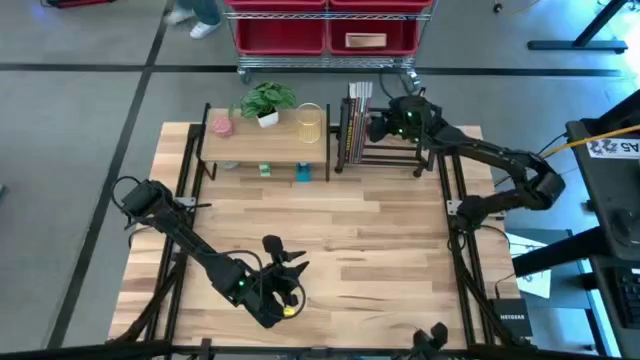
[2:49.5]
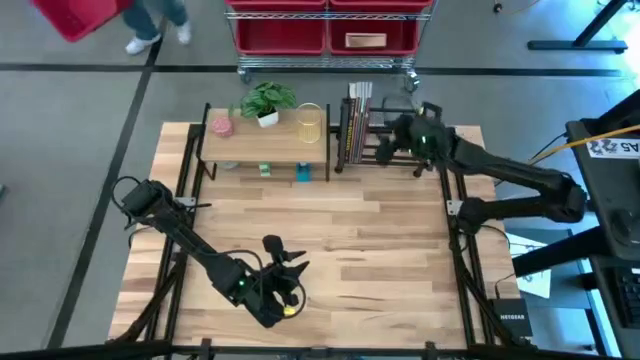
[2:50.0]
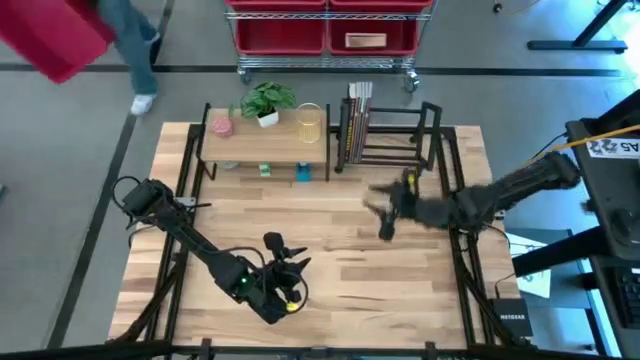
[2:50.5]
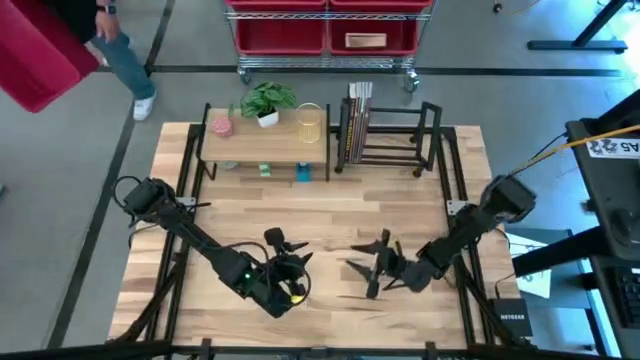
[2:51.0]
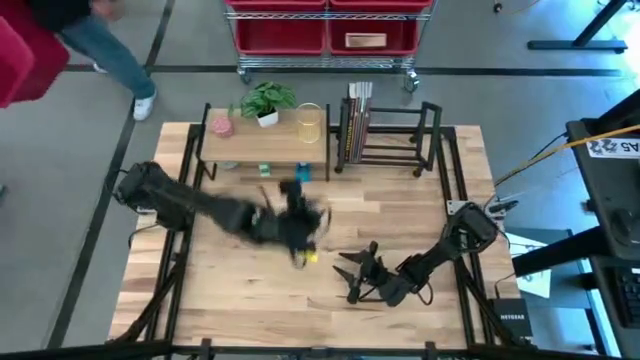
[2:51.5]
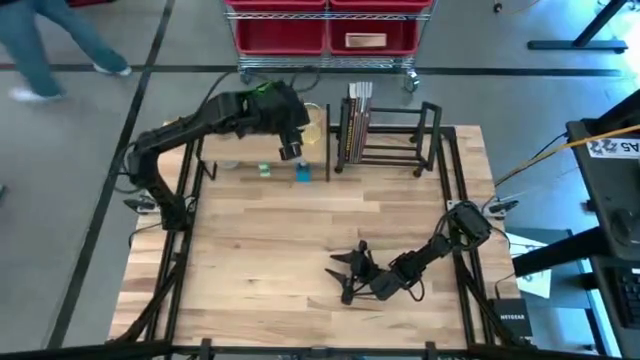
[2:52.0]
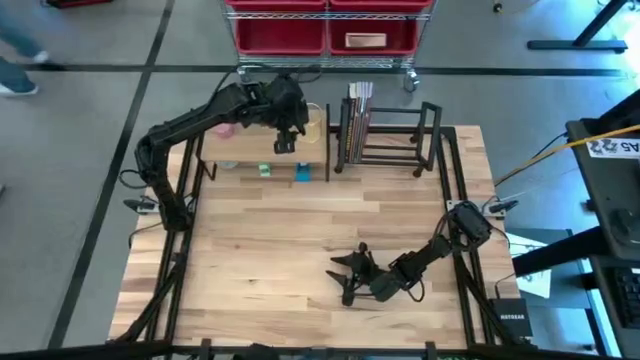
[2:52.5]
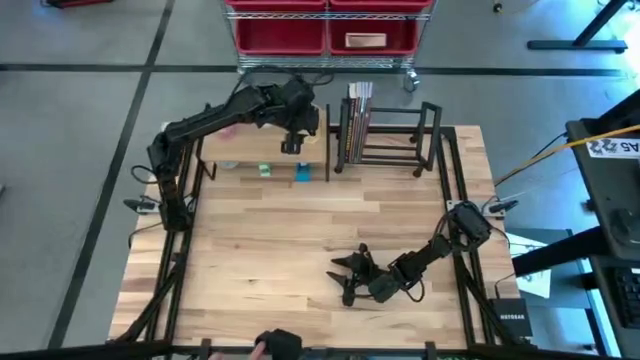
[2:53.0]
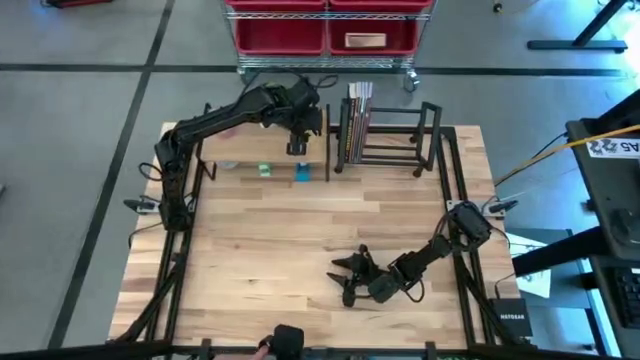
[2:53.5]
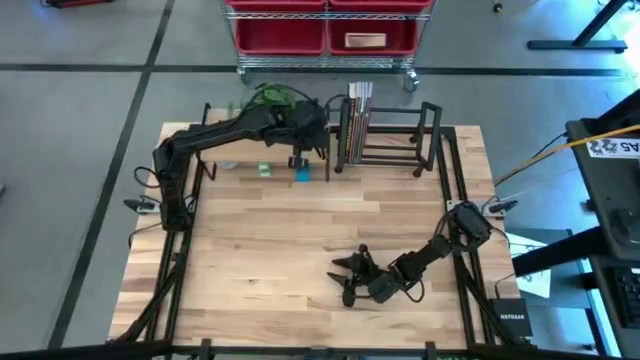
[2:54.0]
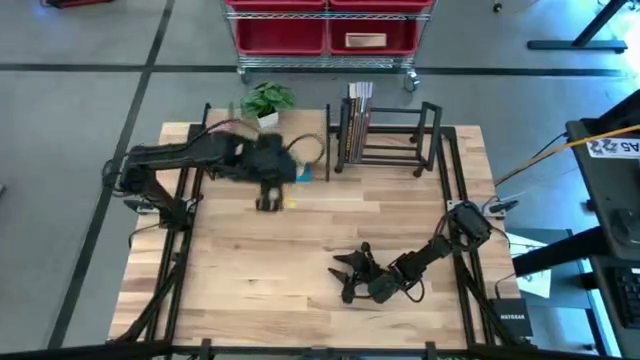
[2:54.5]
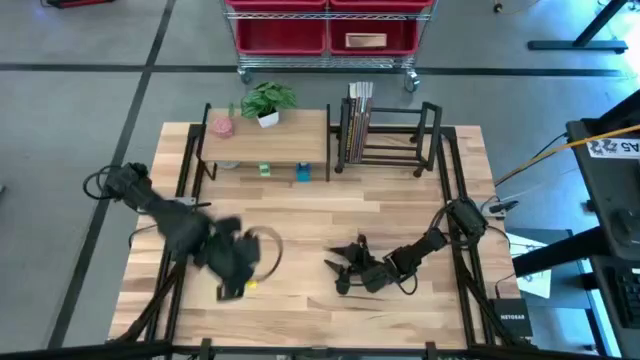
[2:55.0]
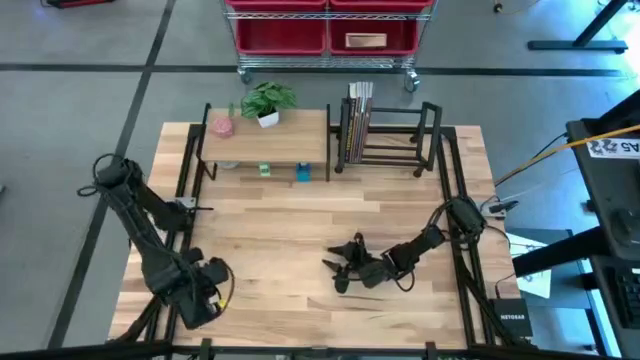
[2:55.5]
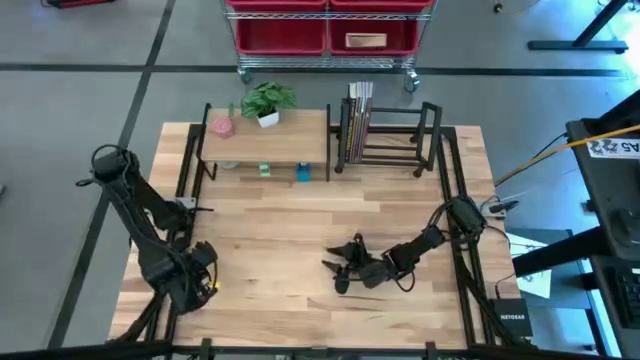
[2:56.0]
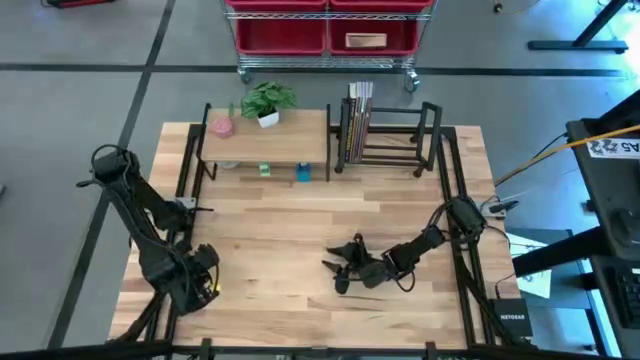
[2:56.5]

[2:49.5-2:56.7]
Task: Stock shelves
Remove the gold pen holder from the shelf

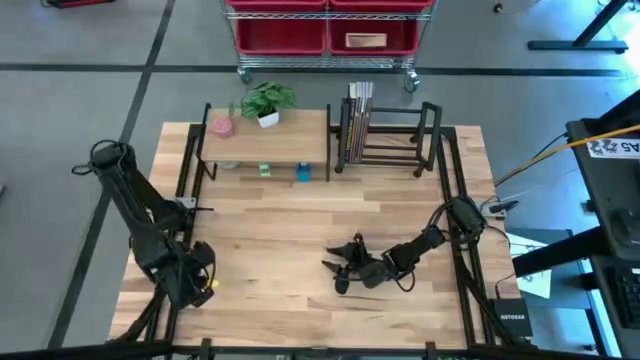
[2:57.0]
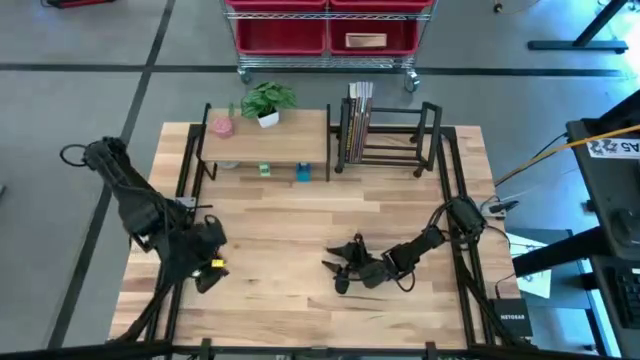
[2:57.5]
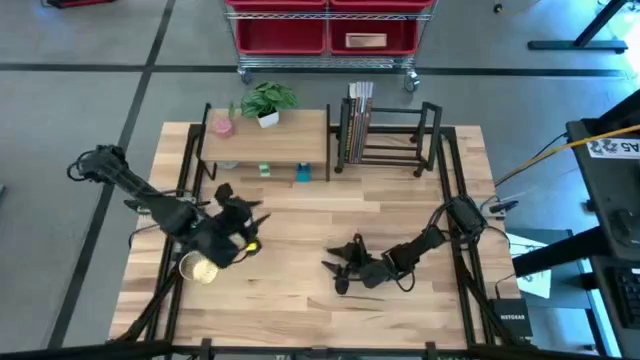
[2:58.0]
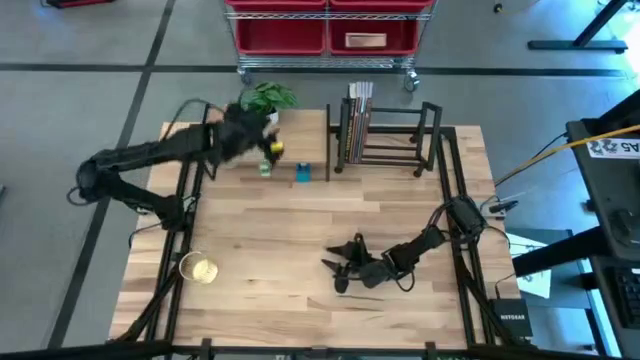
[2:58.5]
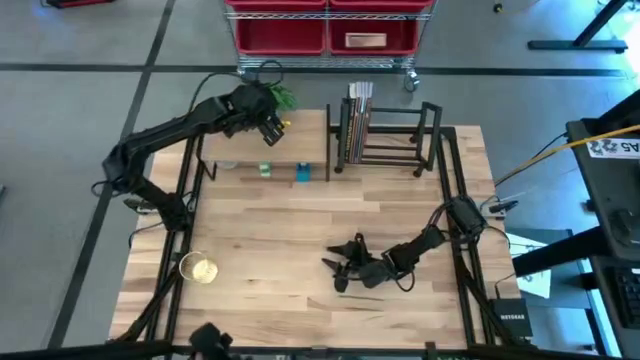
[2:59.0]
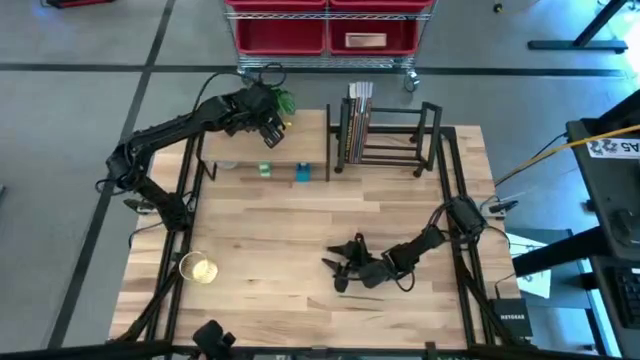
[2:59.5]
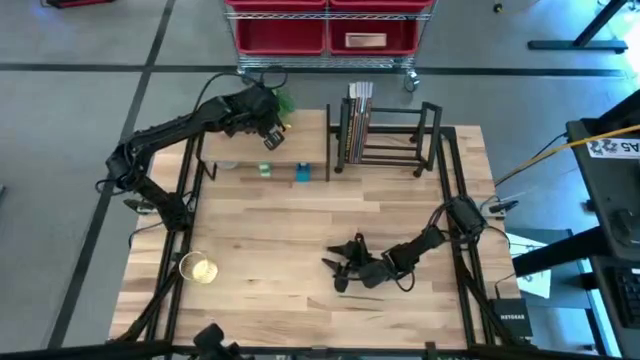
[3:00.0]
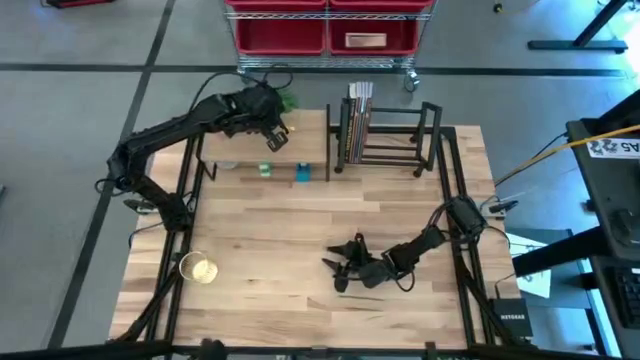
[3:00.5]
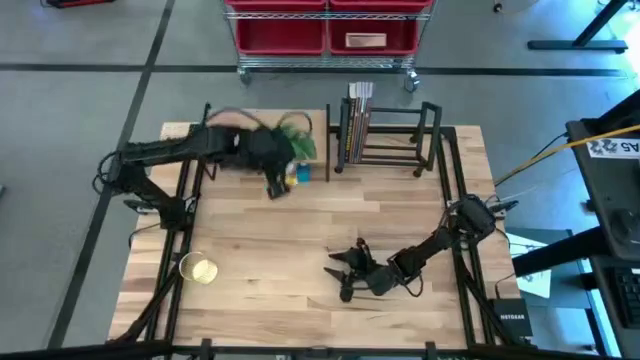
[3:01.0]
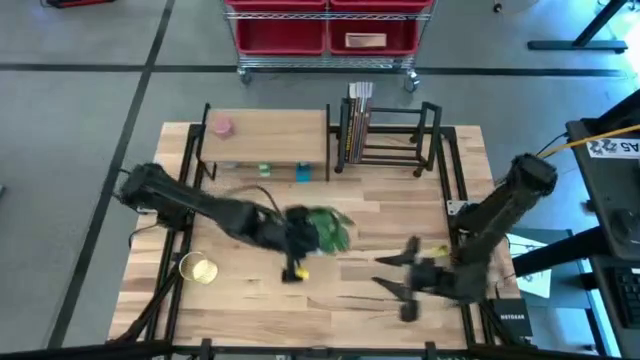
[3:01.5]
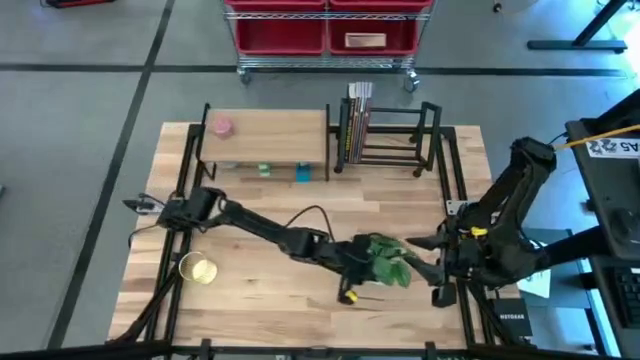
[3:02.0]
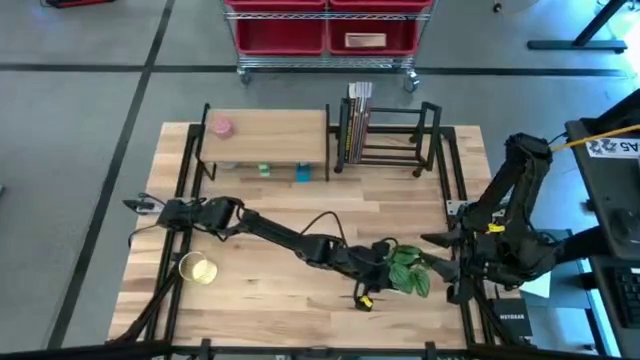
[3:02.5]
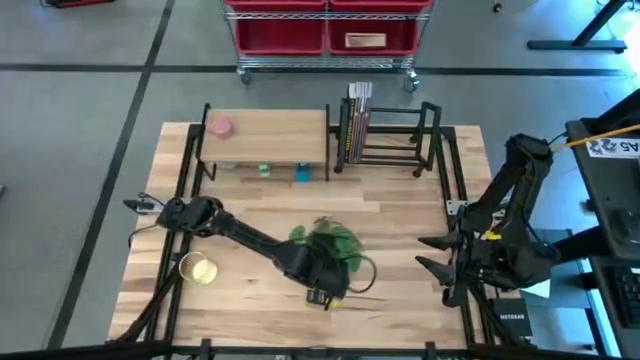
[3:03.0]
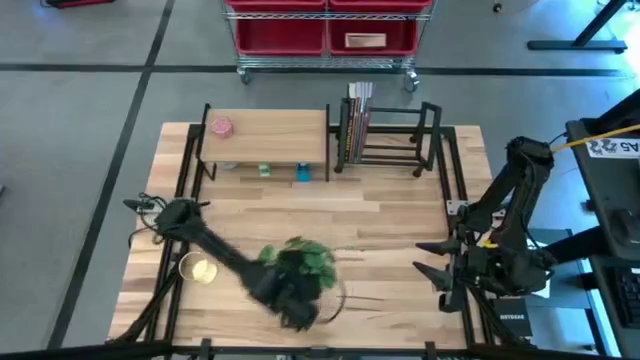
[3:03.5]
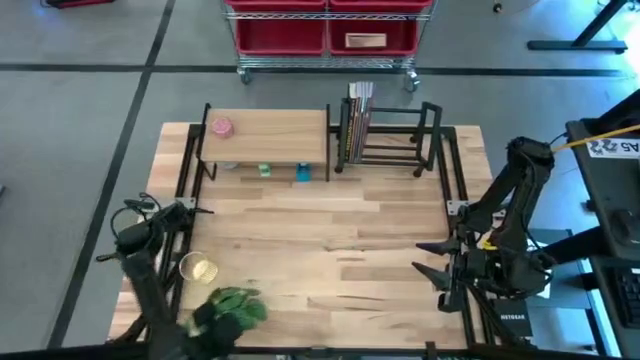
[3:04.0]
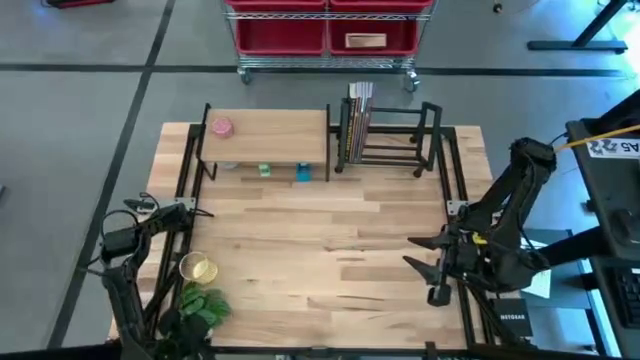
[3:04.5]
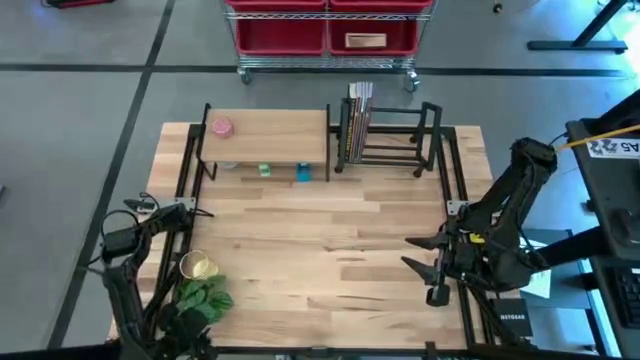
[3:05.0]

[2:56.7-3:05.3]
Remove the white plotted plant from the shelf

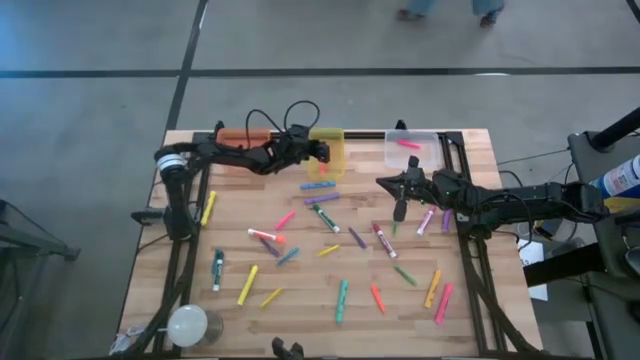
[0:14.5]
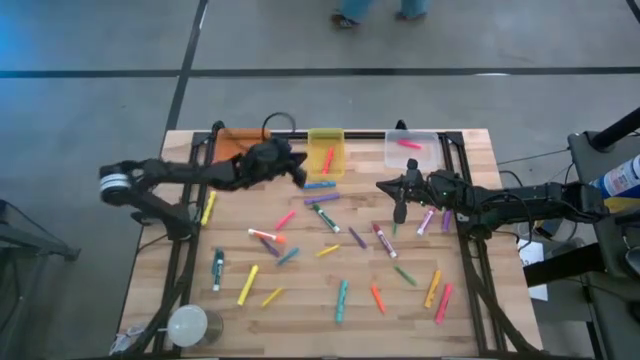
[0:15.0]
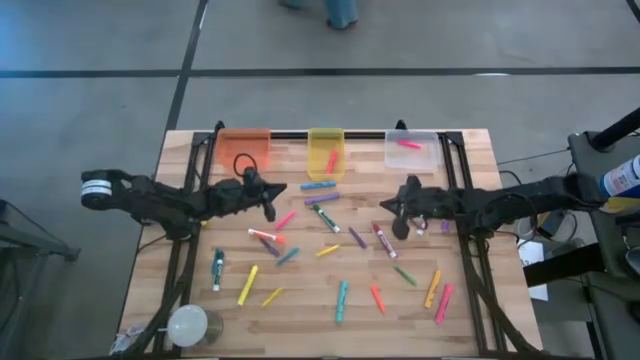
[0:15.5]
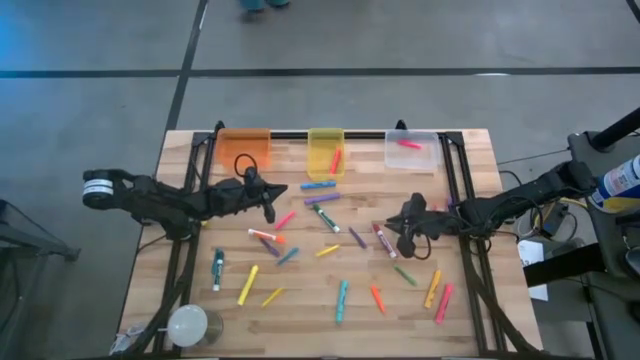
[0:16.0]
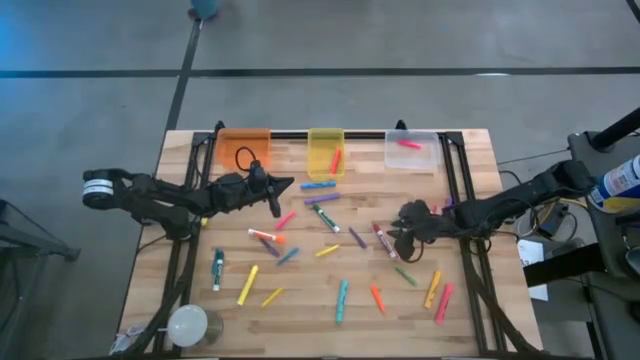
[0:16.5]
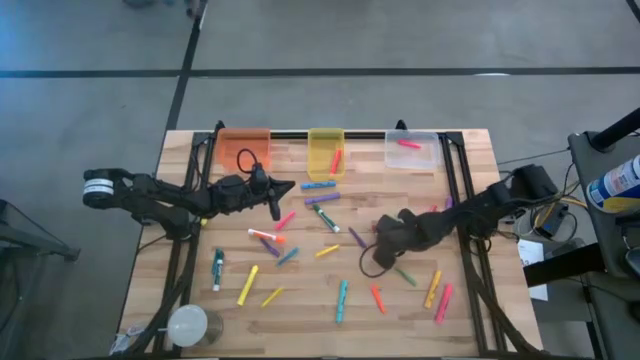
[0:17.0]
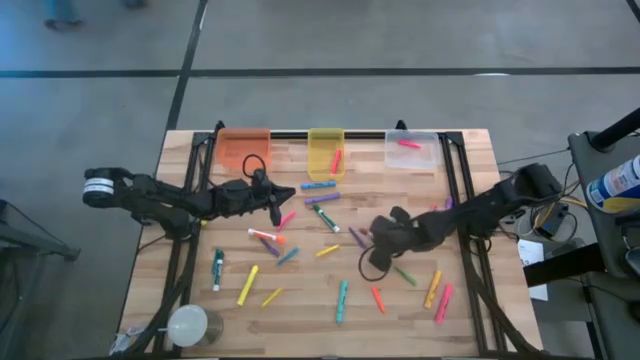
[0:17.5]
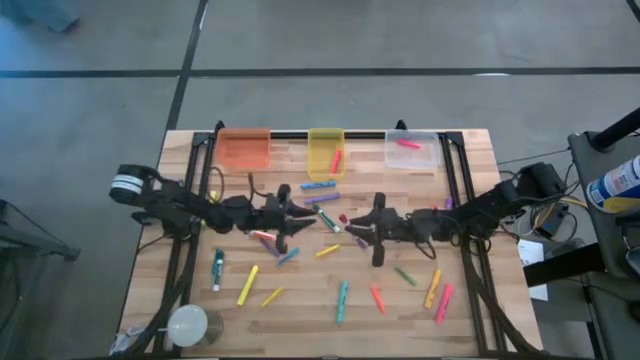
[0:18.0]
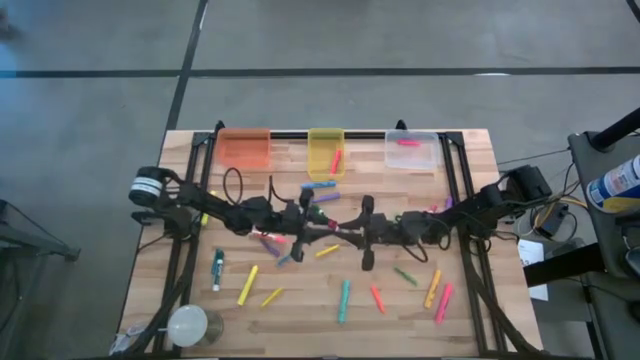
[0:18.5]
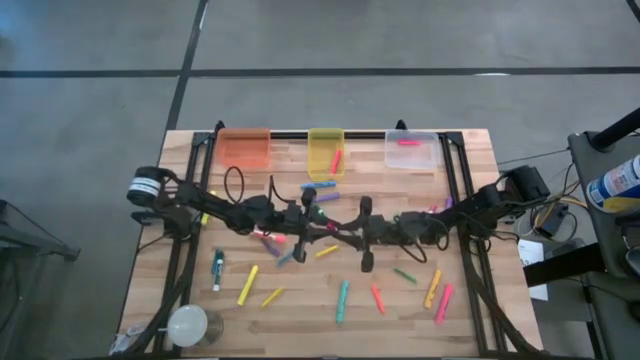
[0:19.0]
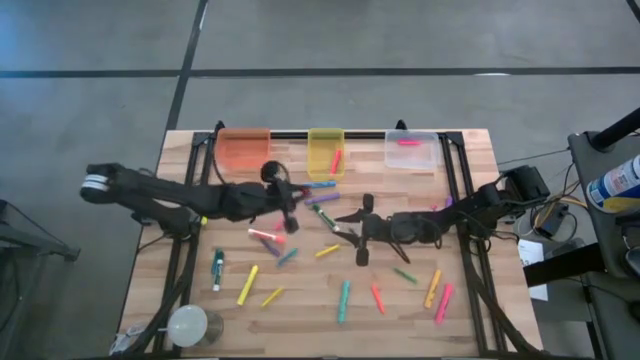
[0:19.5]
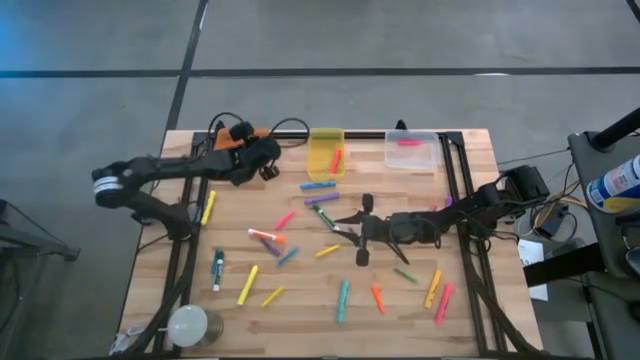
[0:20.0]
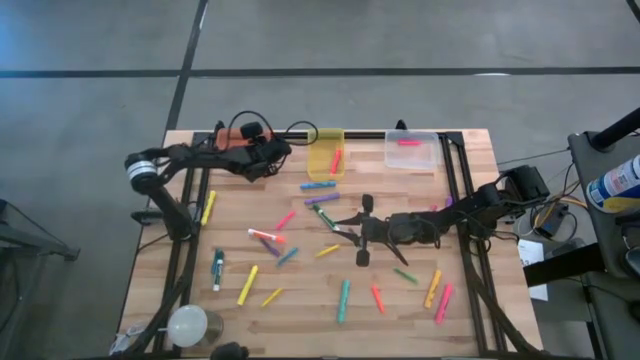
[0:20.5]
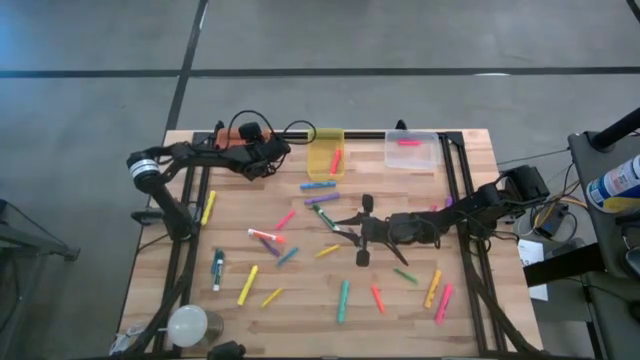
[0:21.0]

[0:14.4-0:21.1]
Task: Pick & Place Markers
Put the red white marker pen into the orange bin
